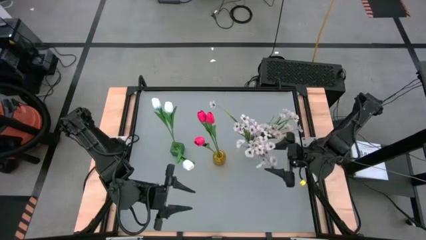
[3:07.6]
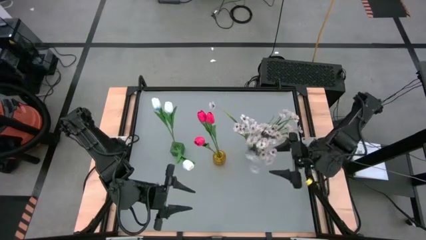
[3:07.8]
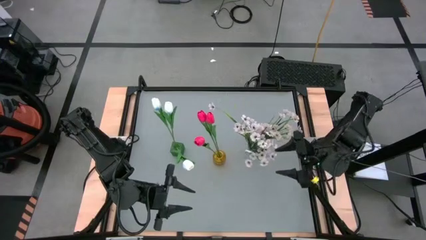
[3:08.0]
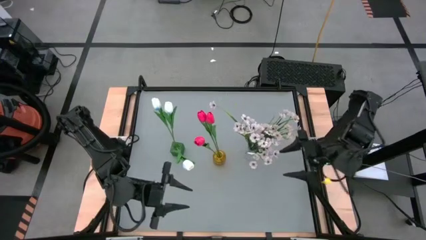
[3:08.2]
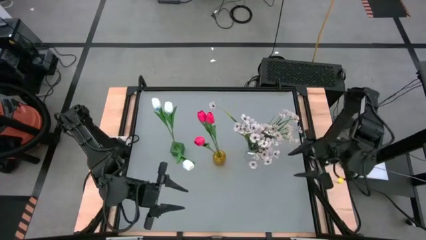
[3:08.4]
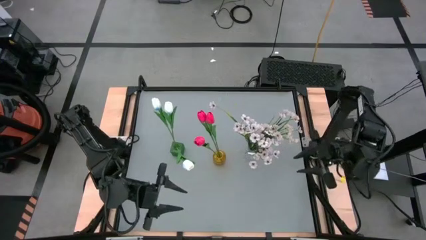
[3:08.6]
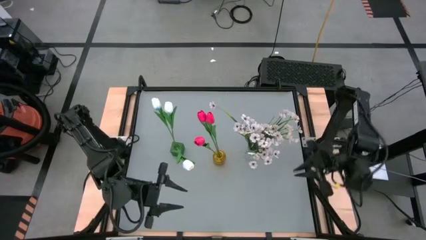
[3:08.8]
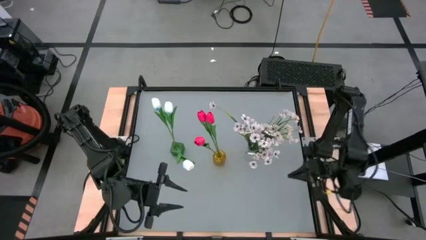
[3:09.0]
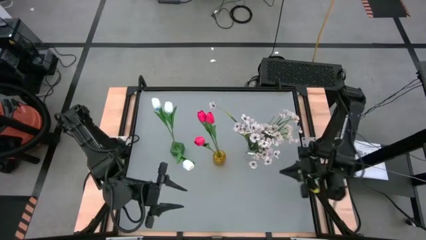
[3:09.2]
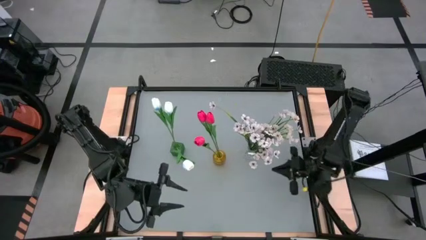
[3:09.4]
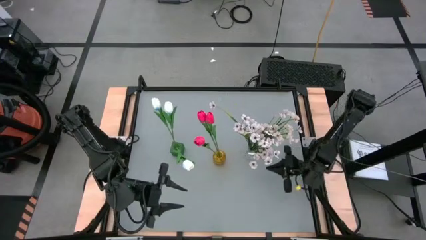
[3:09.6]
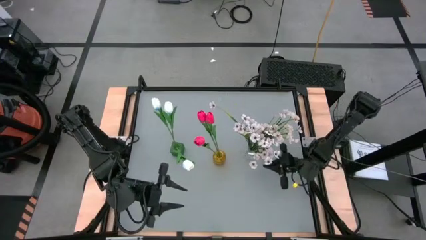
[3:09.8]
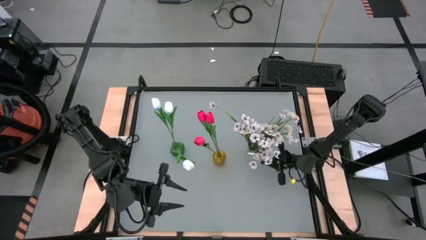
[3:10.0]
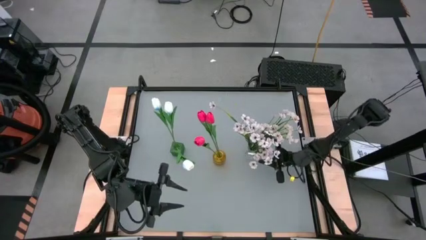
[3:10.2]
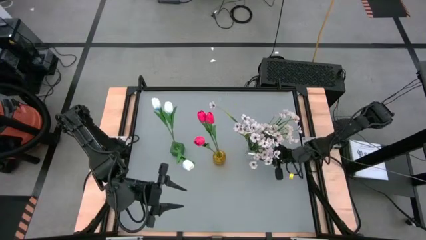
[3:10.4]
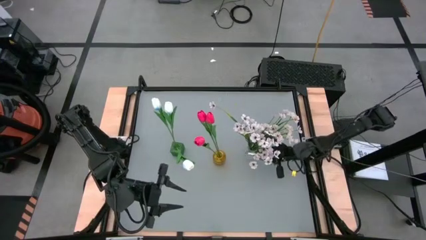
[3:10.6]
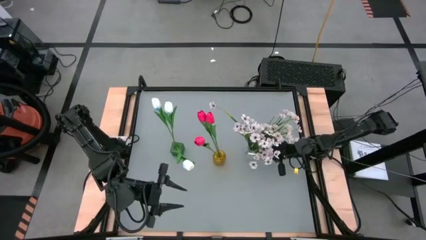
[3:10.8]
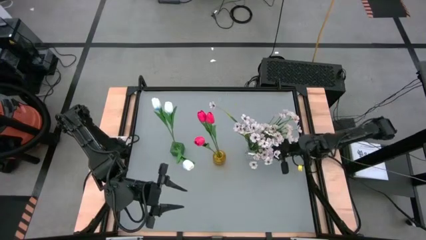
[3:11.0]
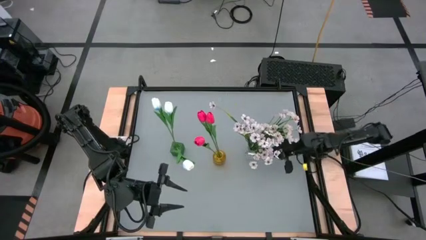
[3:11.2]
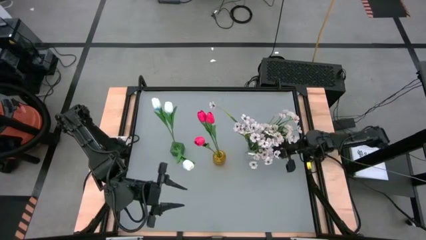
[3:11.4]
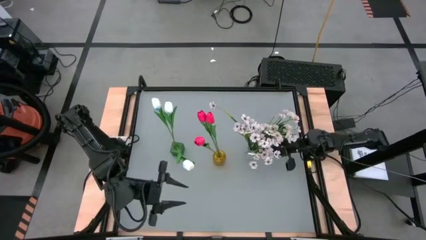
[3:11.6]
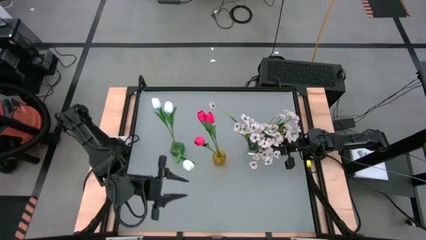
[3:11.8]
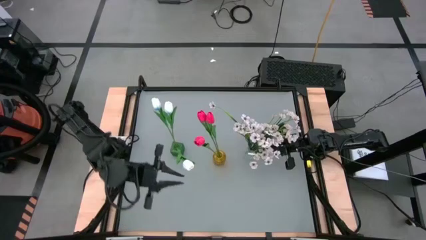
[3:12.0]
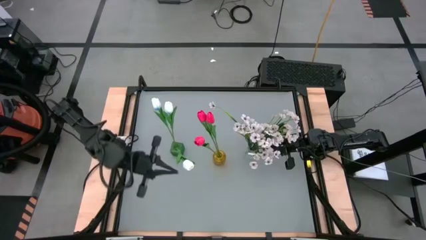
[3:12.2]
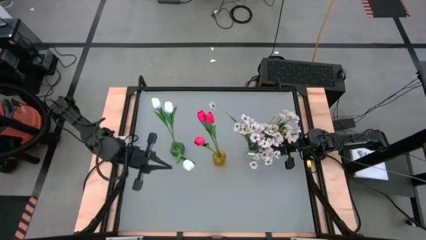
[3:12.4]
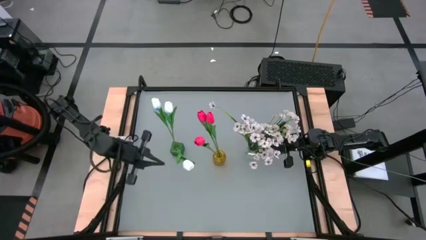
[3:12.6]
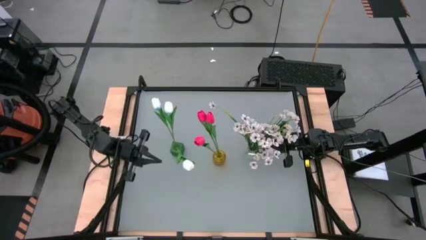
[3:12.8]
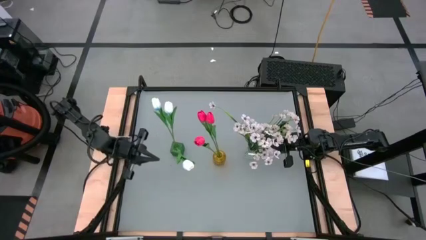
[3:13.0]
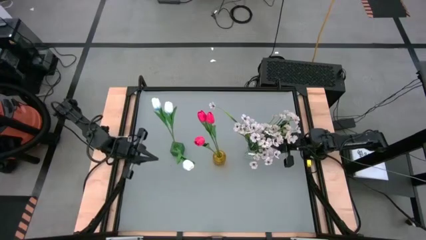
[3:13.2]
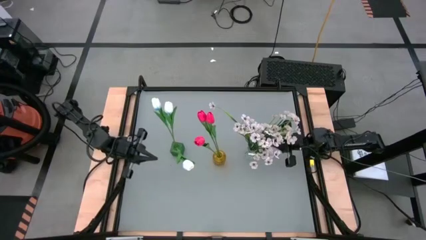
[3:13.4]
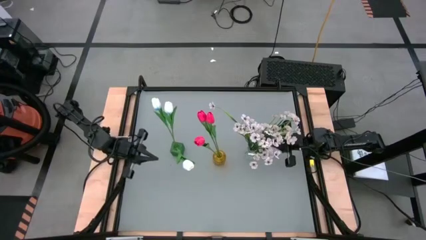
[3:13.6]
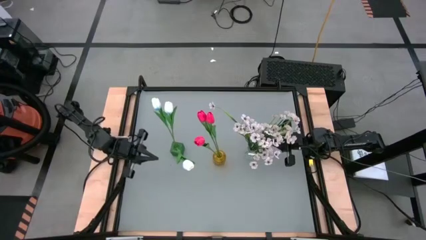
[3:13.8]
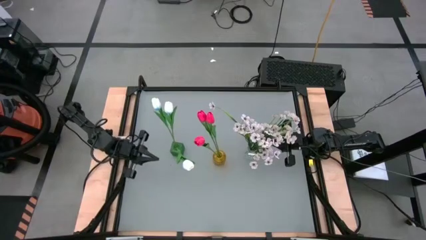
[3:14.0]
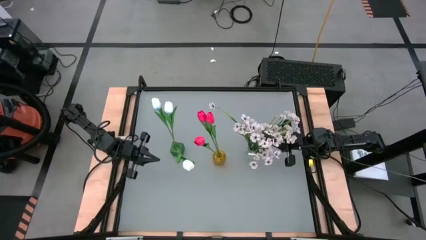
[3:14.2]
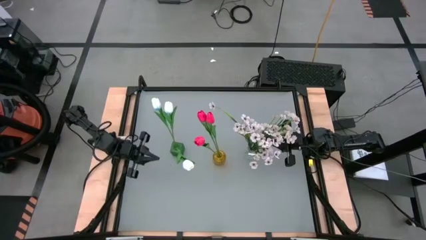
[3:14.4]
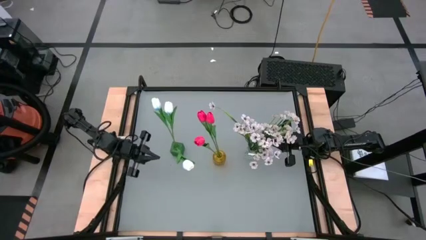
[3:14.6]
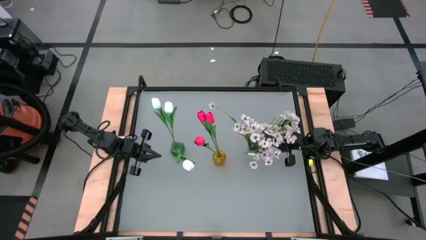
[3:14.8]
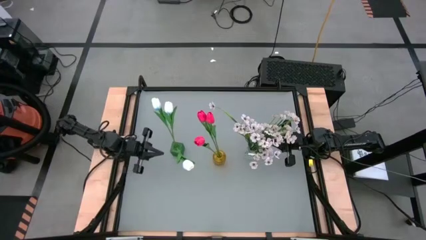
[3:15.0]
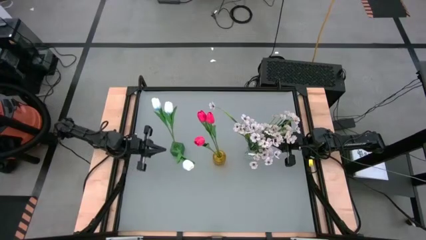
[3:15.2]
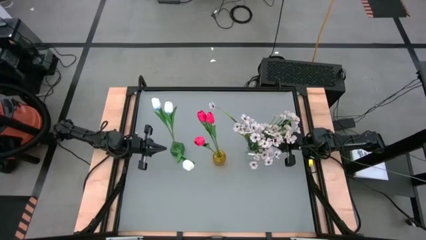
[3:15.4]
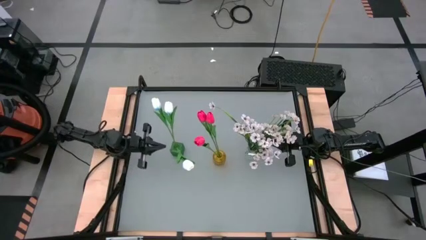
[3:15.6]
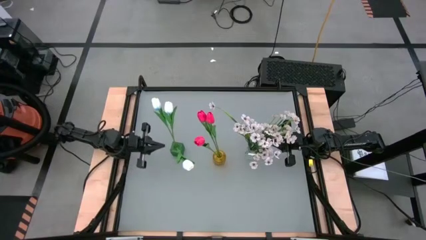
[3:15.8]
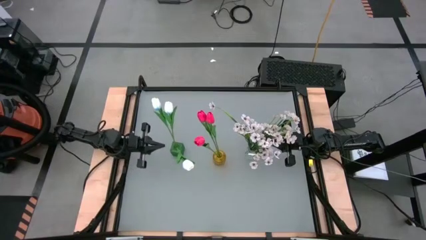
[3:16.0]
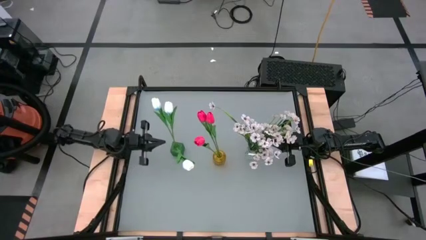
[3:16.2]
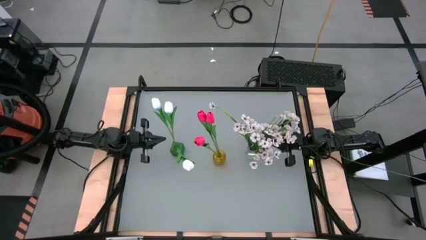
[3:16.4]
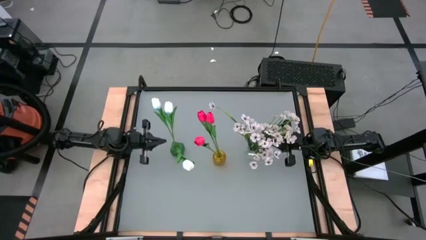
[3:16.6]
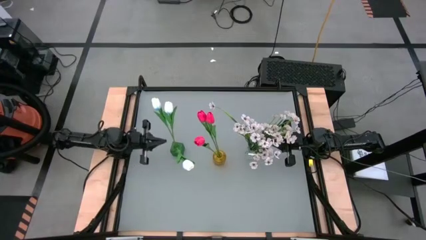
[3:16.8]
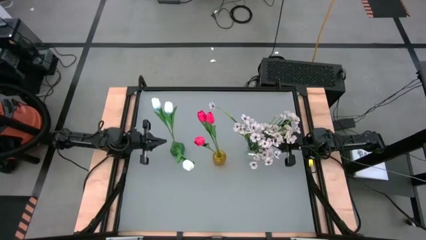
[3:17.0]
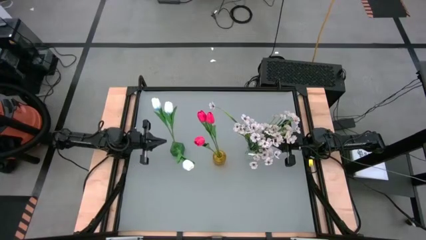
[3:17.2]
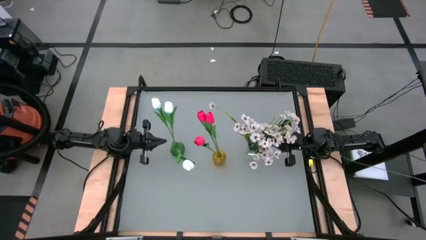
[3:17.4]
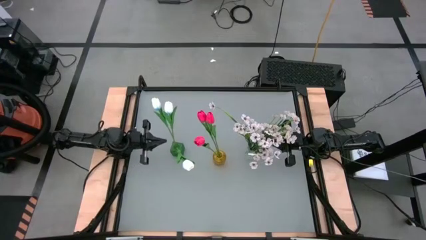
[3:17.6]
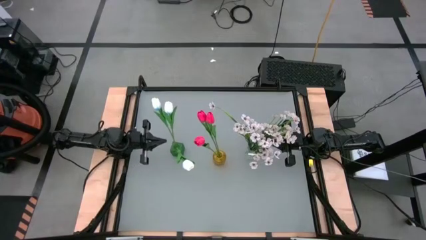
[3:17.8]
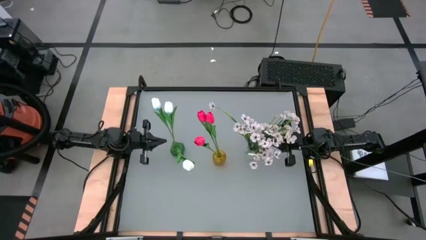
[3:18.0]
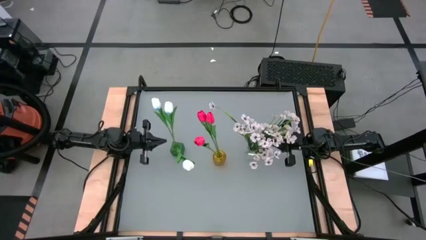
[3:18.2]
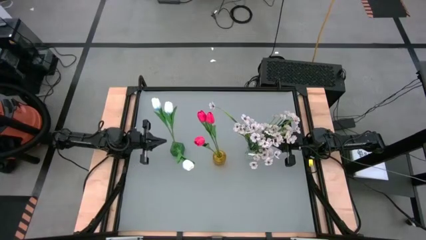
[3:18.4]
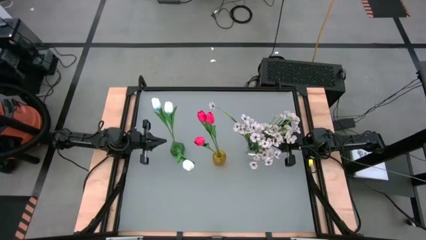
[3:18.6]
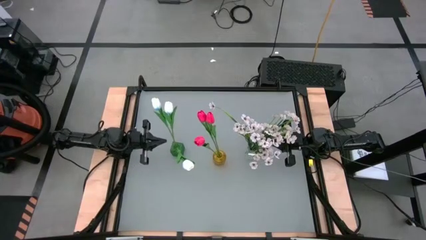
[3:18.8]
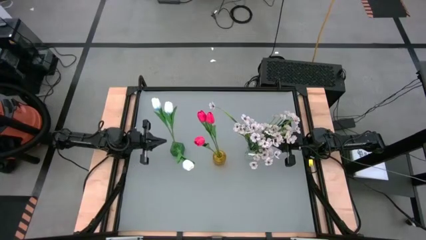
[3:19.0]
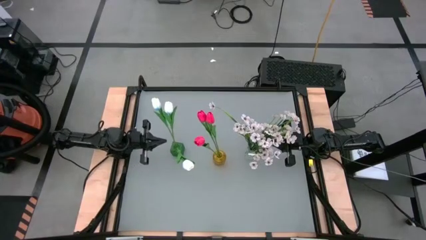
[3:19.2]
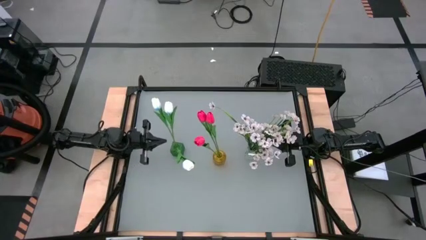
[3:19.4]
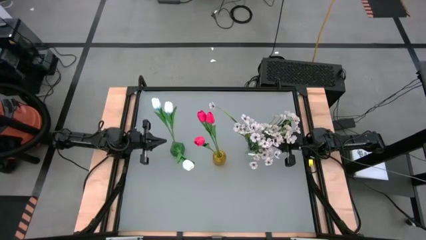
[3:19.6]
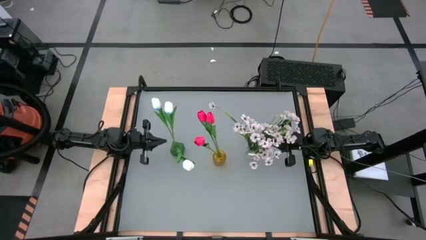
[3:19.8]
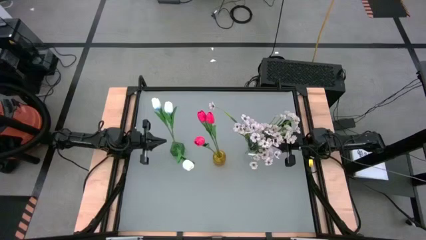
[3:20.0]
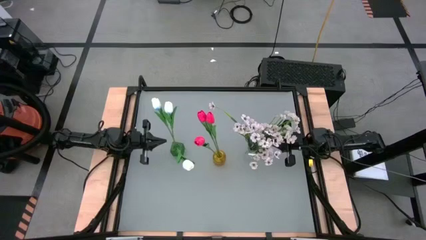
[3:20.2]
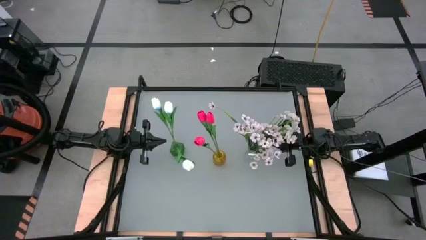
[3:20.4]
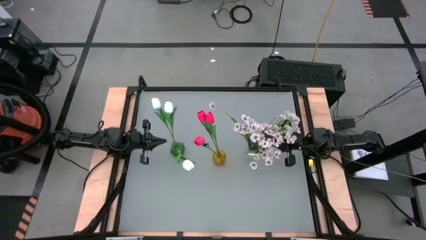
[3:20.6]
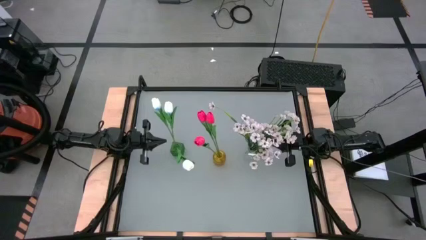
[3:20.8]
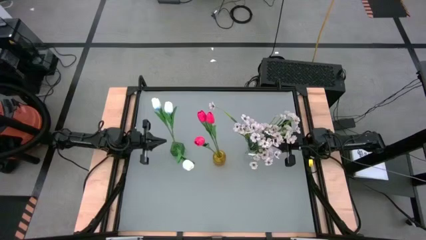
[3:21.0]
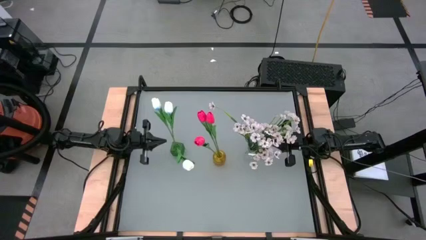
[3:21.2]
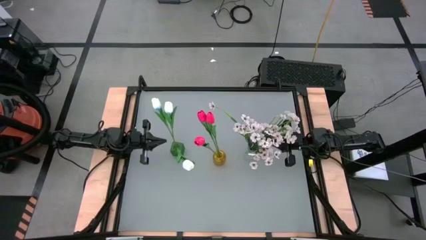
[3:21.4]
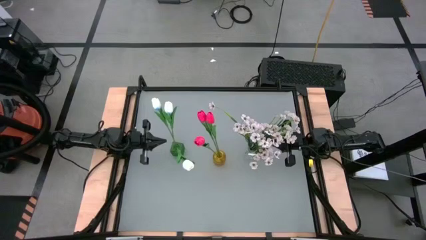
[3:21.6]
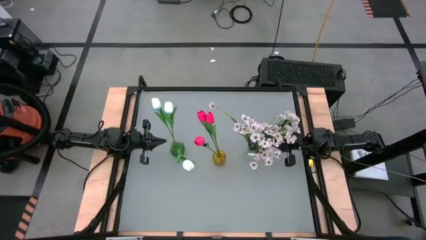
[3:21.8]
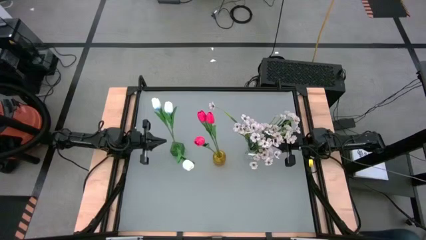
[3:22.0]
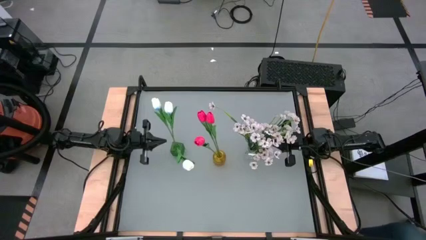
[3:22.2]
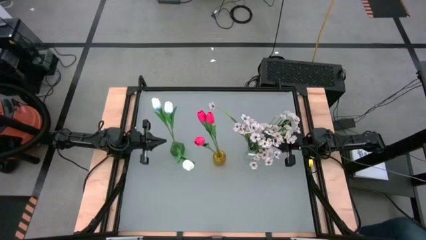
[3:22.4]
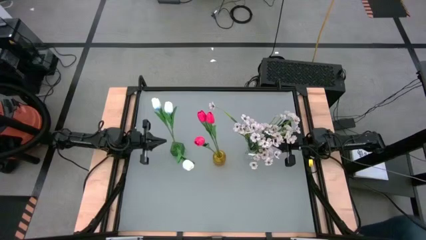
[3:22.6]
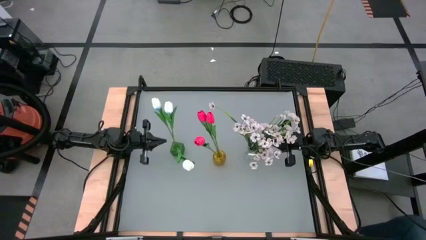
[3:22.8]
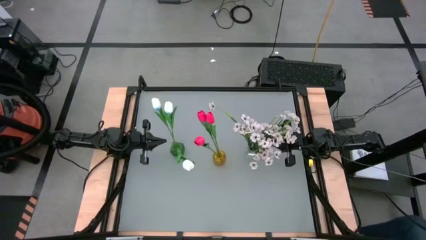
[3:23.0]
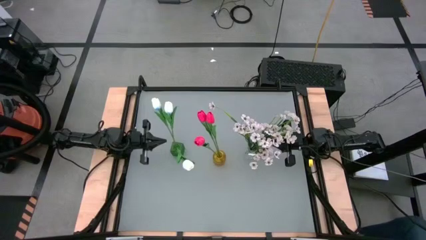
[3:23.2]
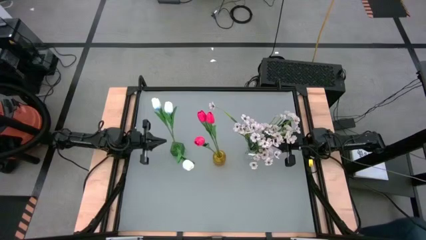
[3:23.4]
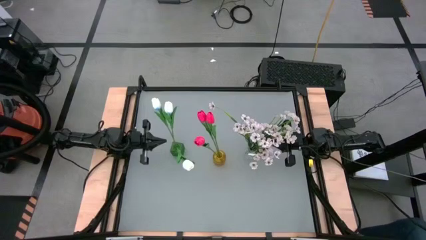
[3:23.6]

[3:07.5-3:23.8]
Task: Sort flowers into vase by color
Return to Home Position

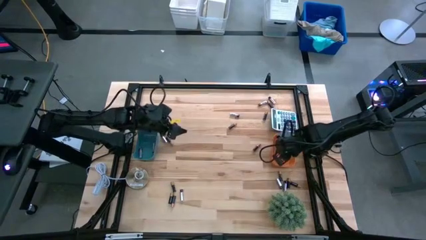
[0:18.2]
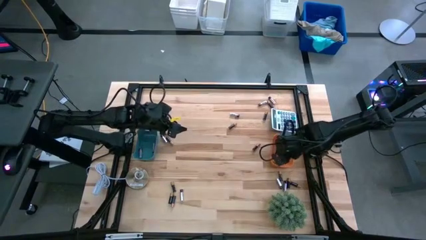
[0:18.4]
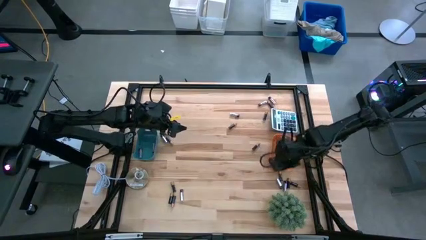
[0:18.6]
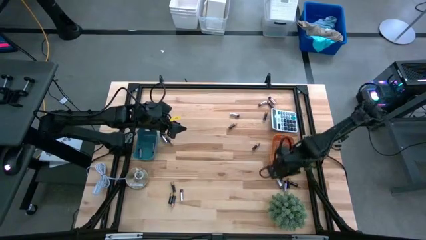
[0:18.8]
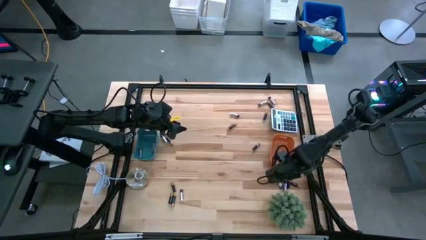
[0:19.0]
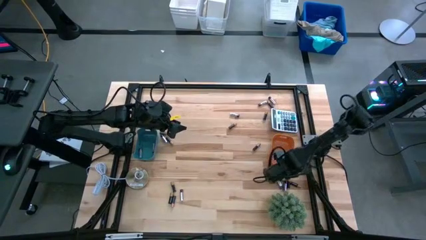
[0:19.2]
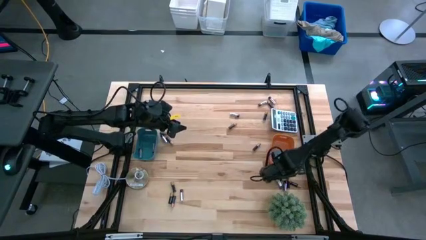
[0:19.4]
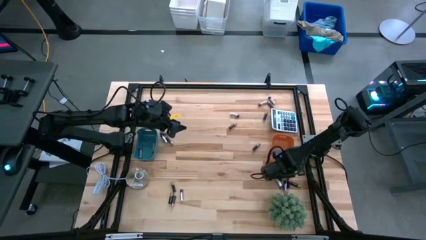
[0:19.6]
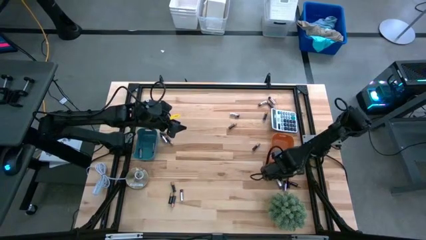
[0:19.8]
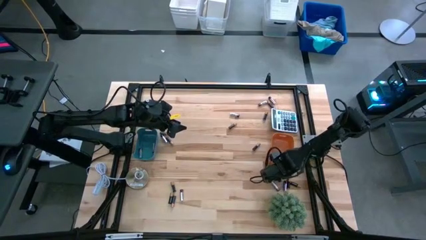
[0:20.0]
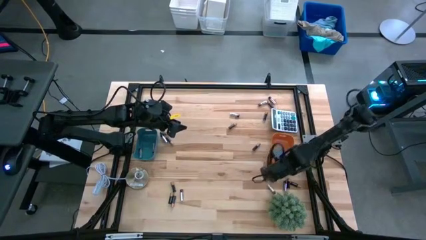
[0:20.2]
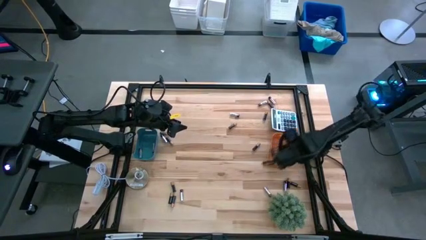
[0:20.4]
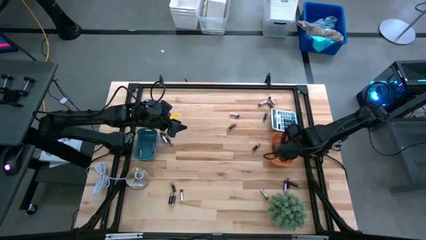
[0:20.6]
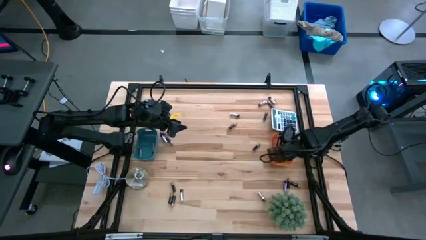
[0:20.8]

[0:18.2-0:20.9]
Task: Sort batteries
Put the black battery into the orange bin
